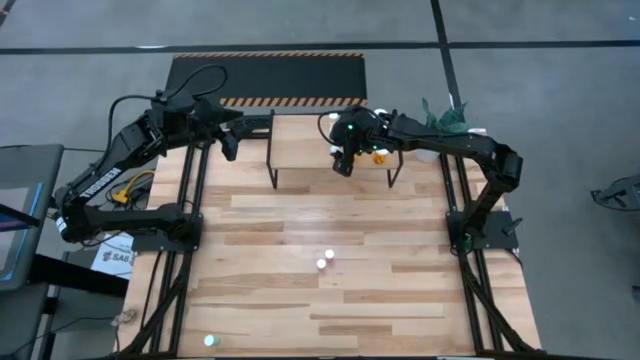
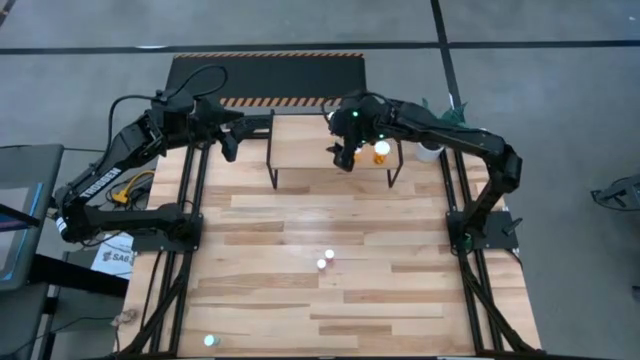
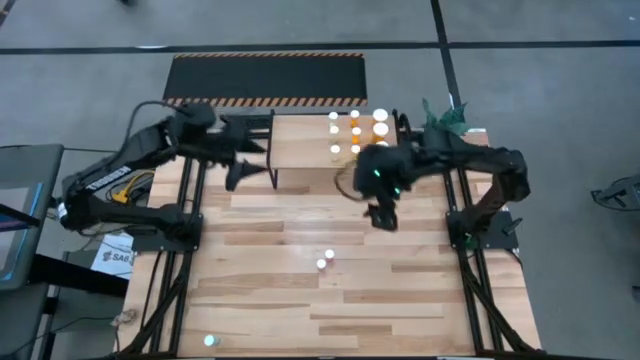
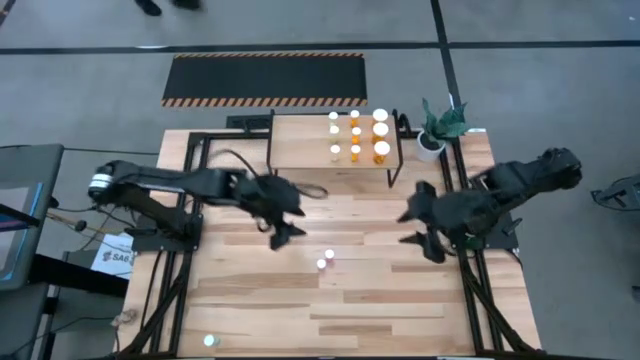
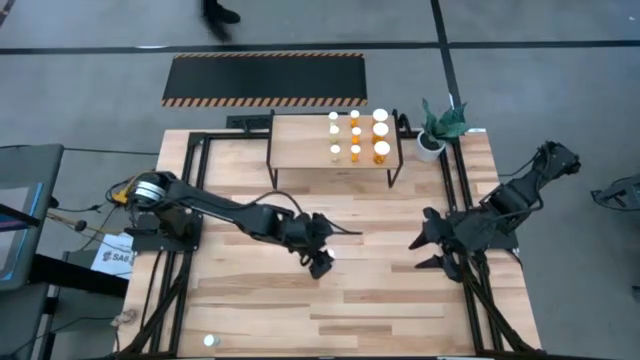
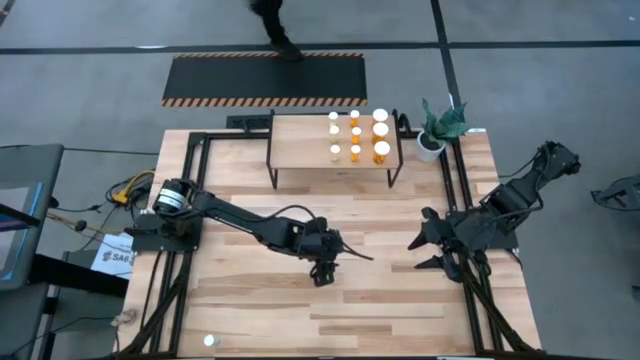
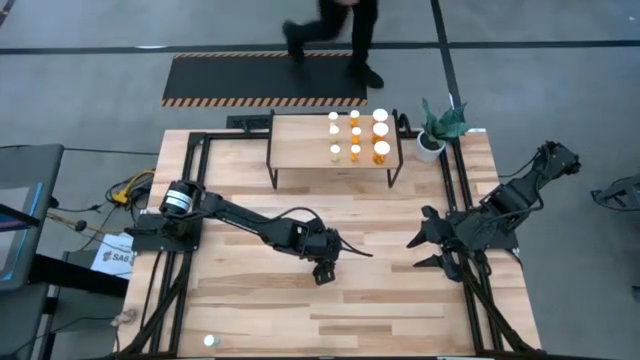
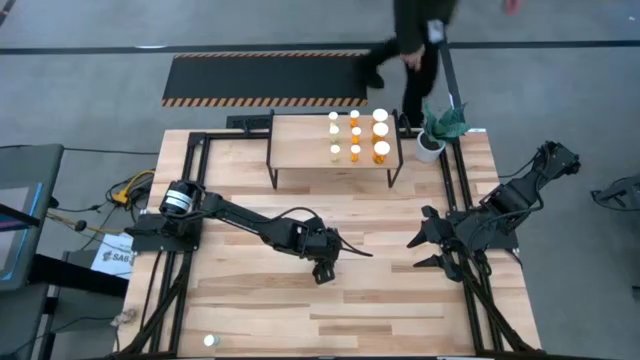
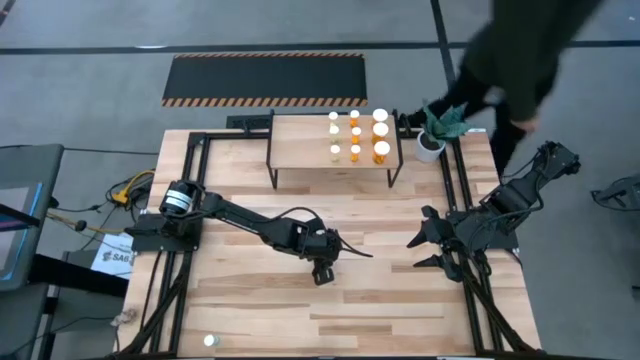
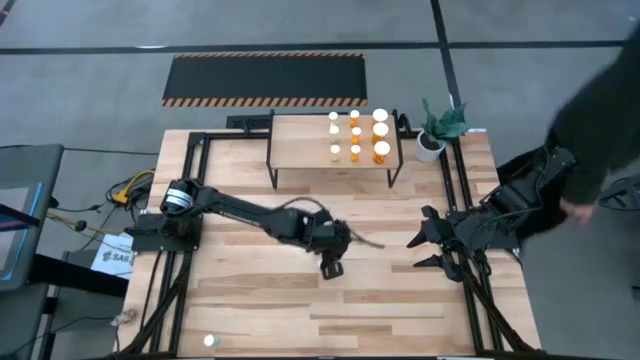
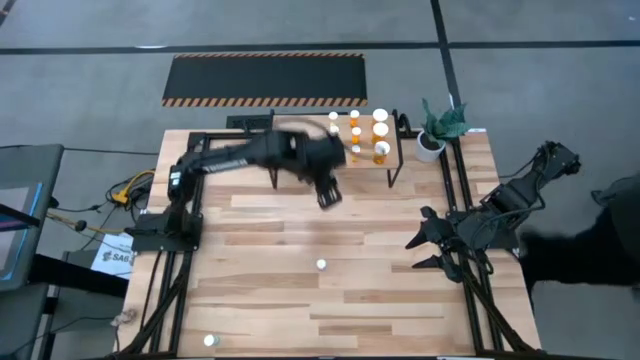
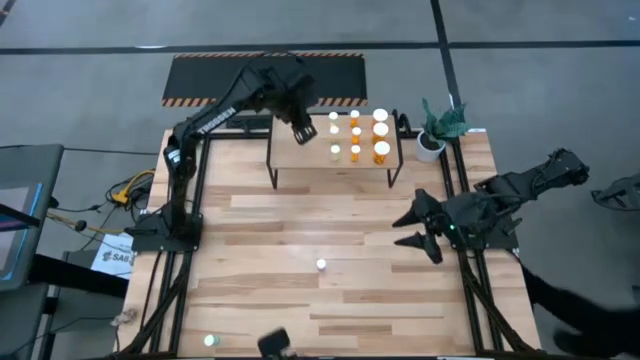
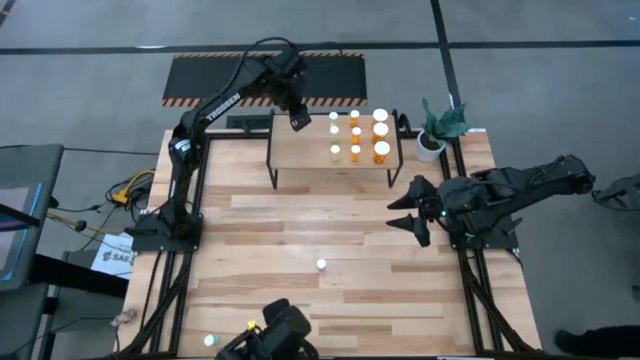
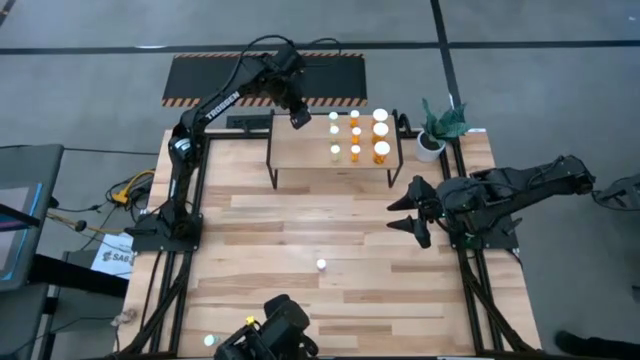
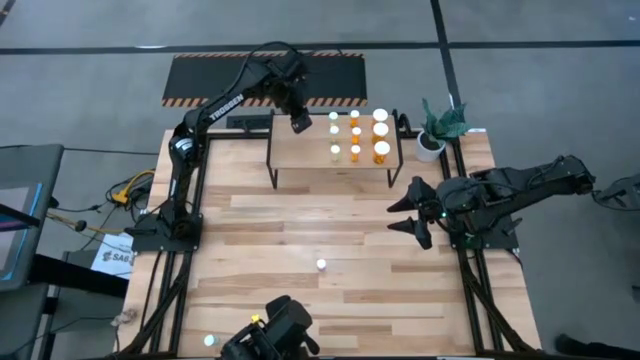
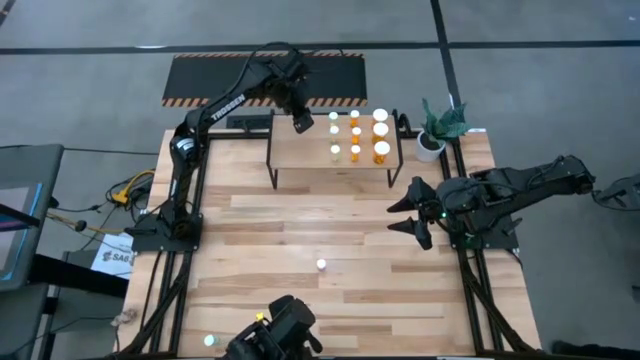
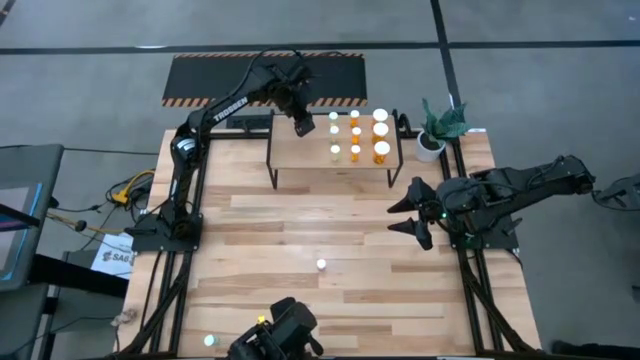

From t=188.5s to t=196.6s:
Task: Pick and place medicine bottles onto shelf by color
Put the right small pink pill bottle on the shelf

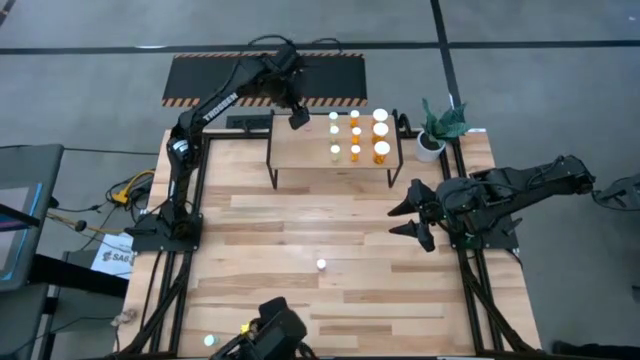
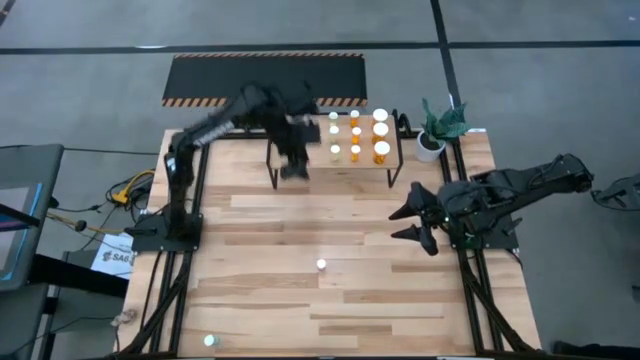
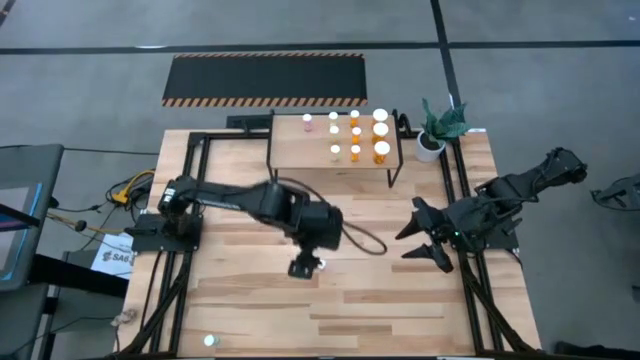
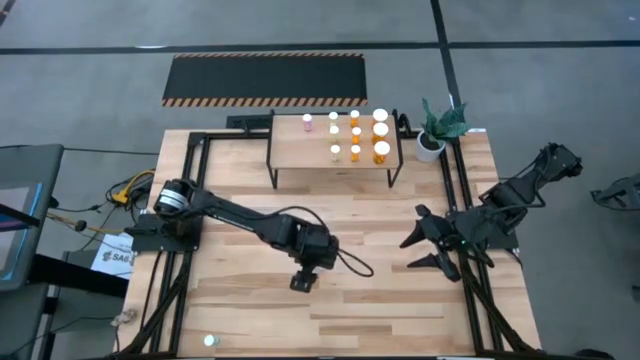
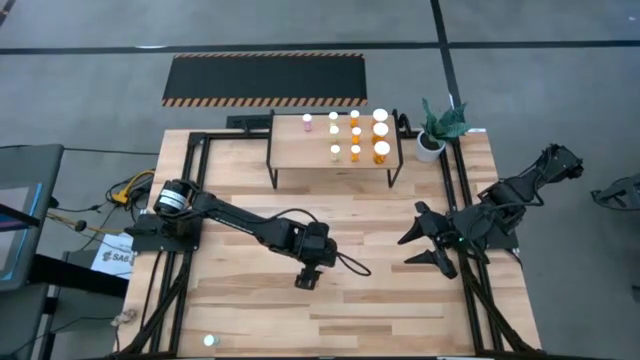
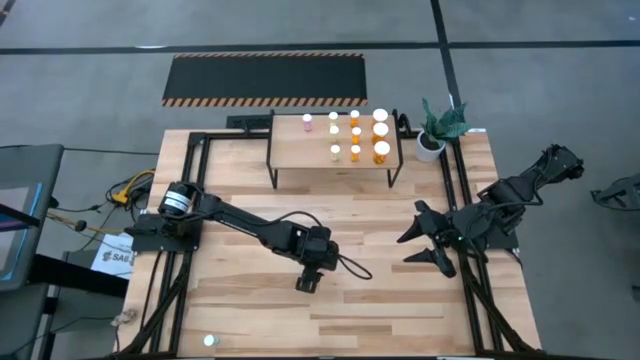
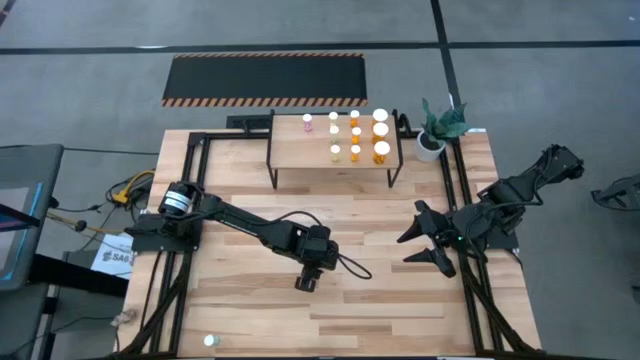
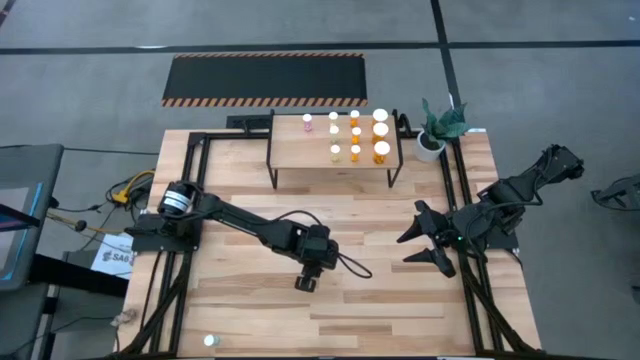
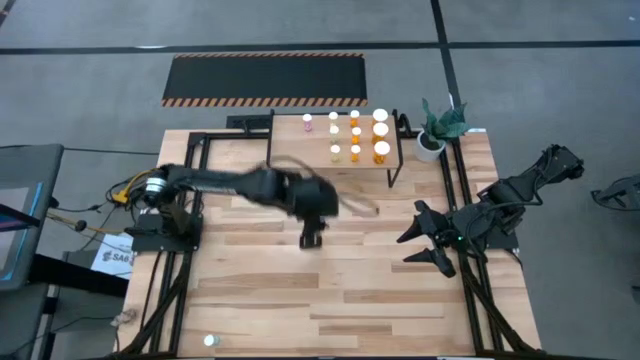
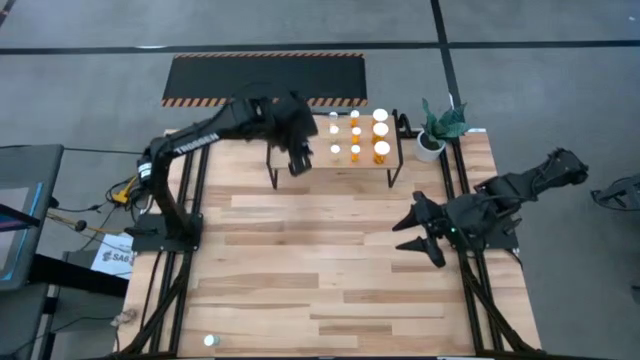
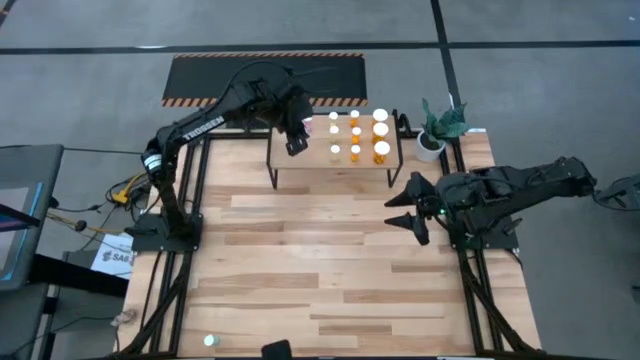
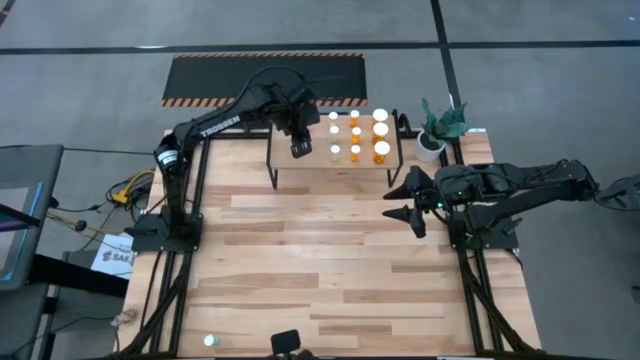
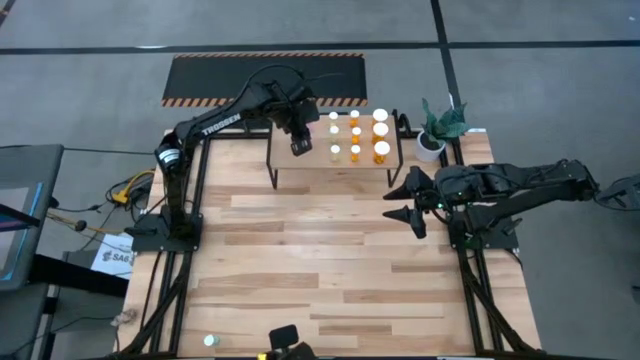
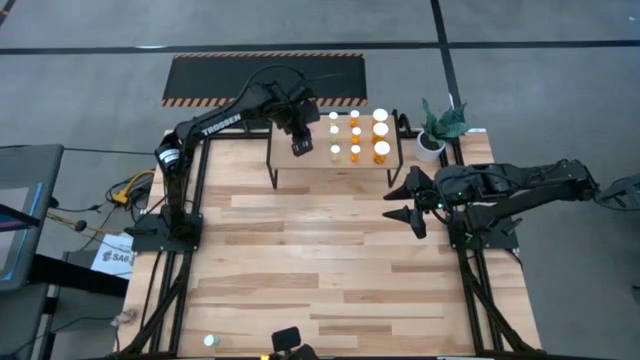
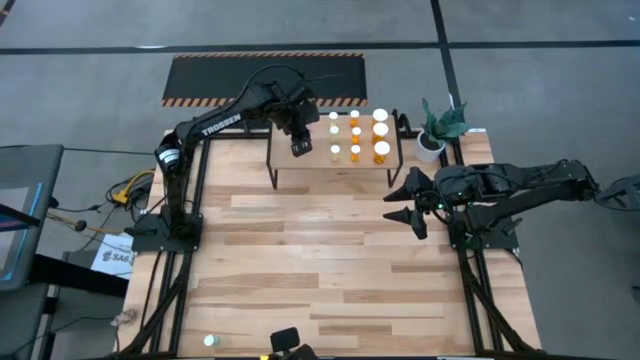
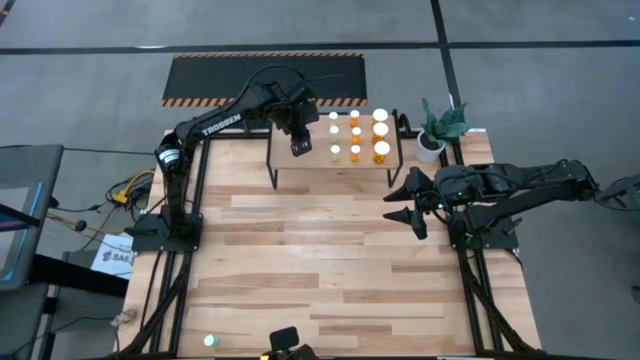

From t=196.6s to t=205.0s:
Put the small pink pill bottle on the shelf aligned with the other small pink pill bottle

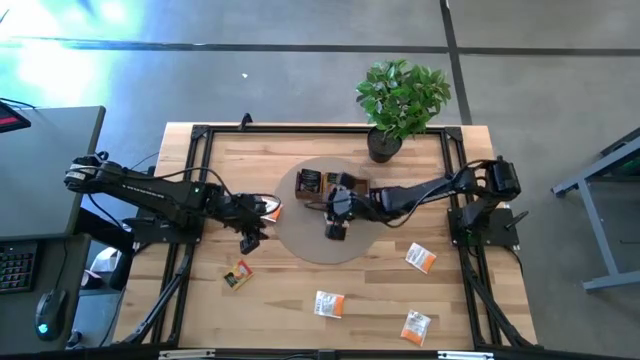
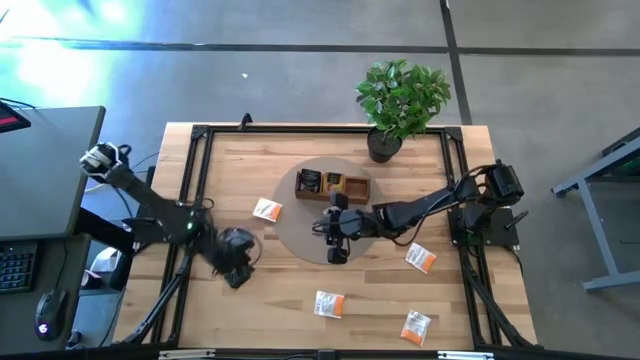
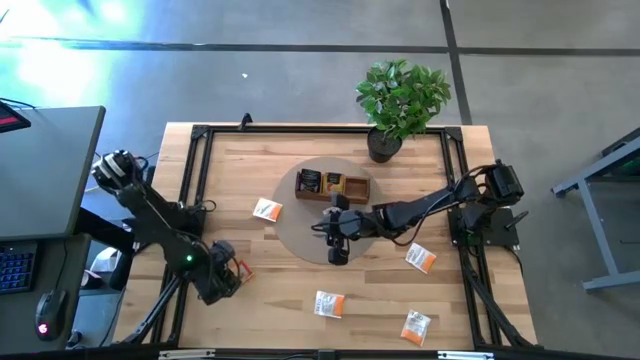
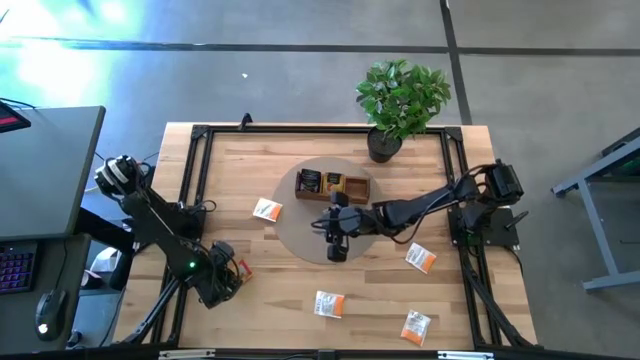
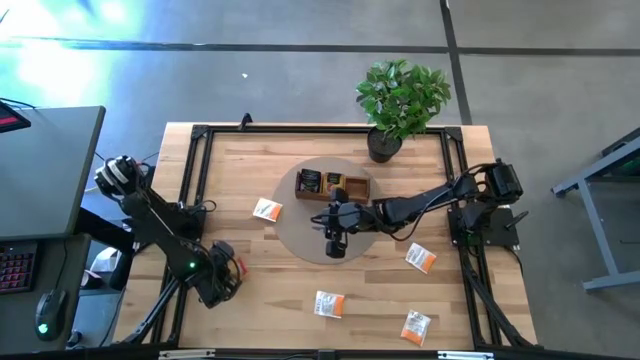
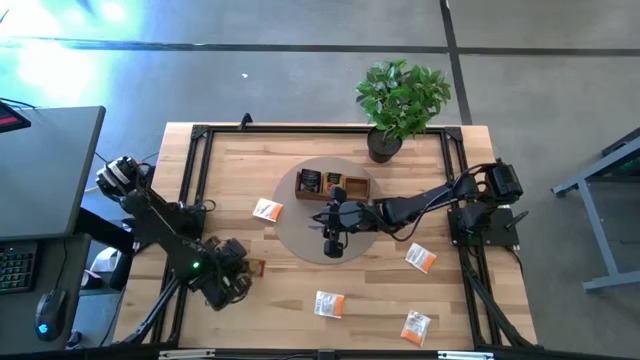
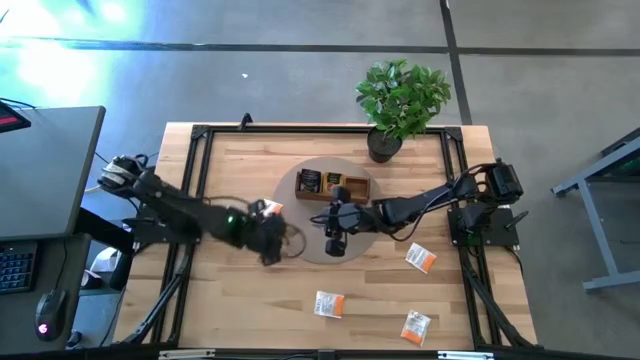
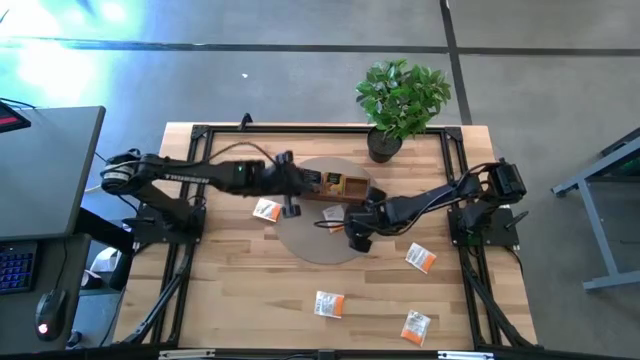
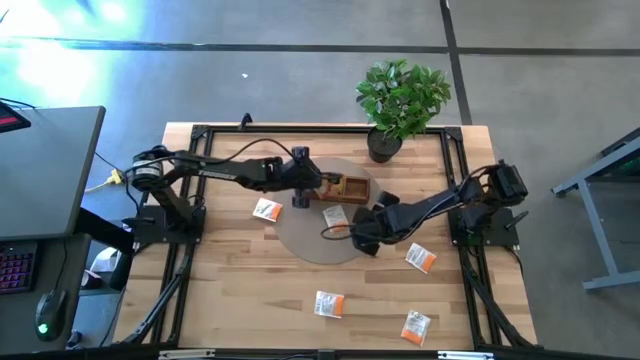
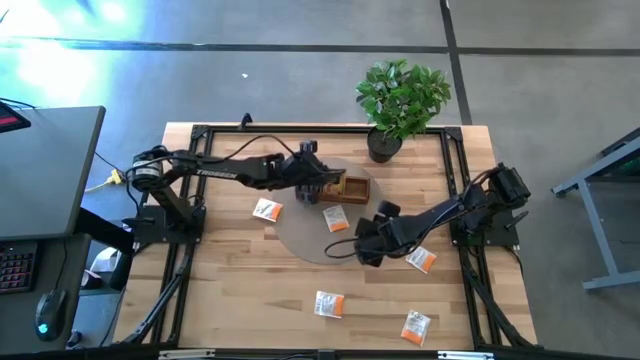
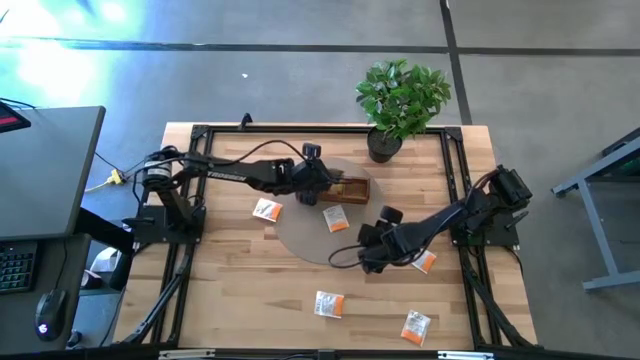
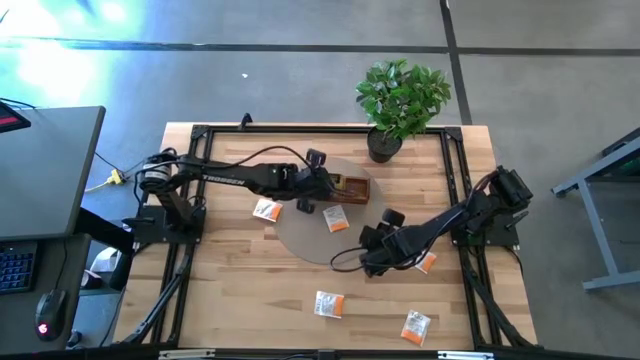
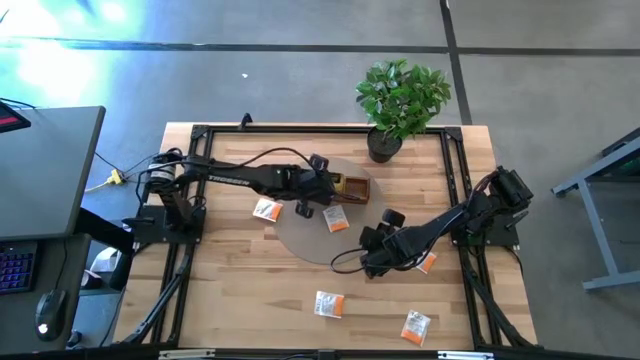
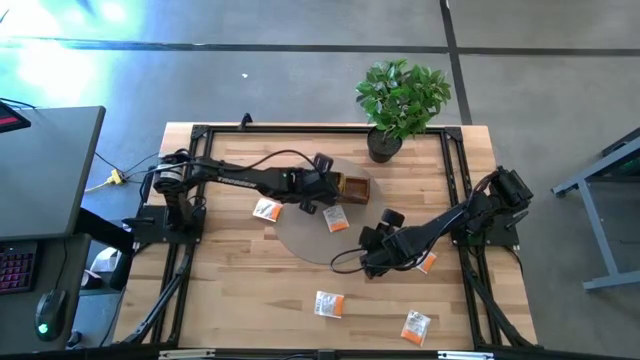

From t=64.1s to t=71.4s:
Task: Pick & Place Tea
Put the orange tea bag into the middle area of the wooden organizer
